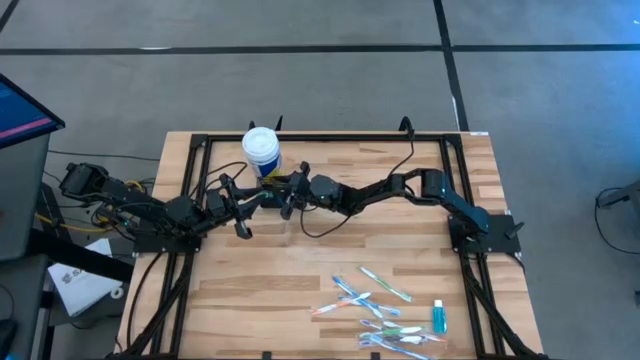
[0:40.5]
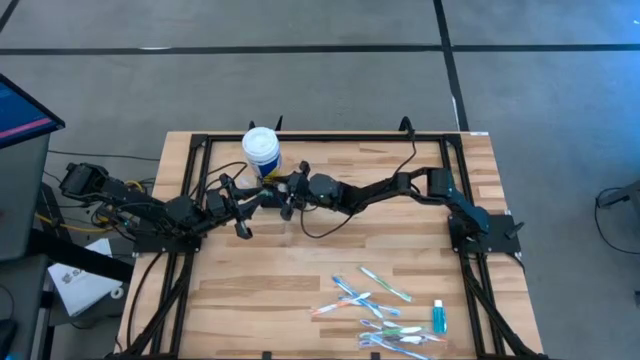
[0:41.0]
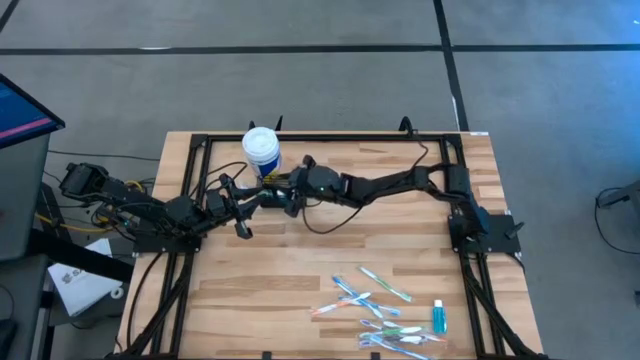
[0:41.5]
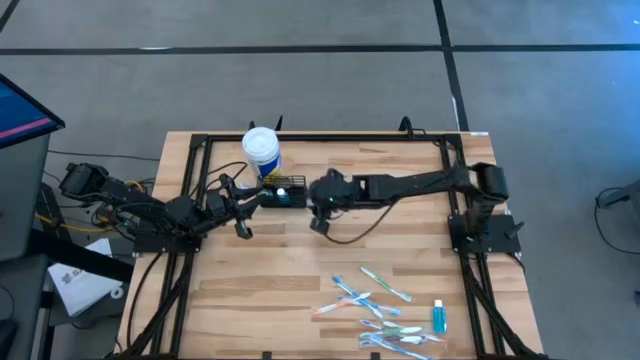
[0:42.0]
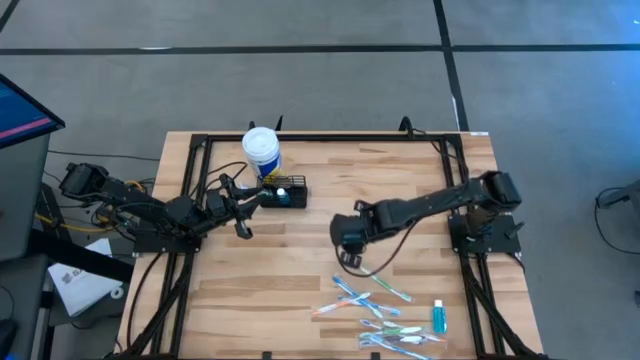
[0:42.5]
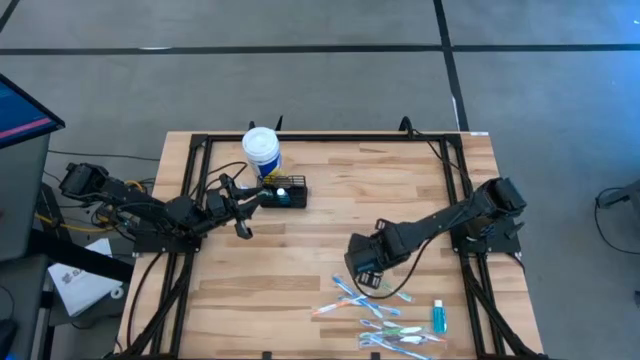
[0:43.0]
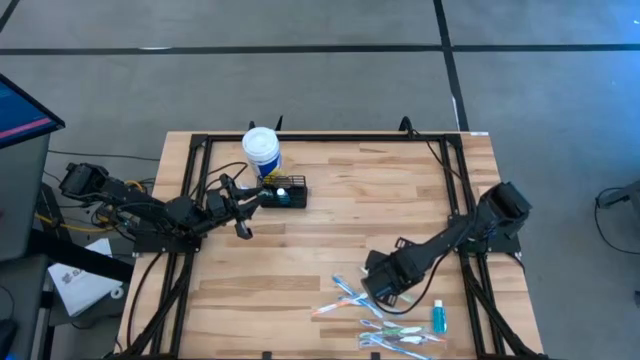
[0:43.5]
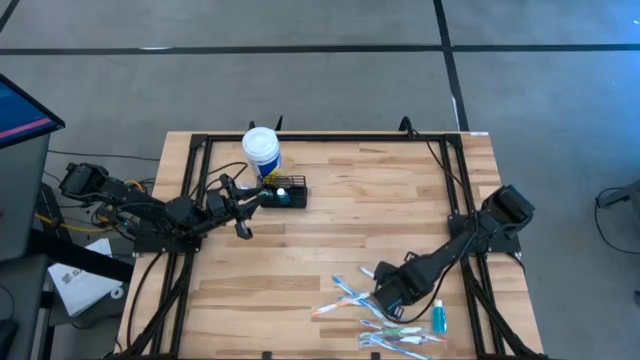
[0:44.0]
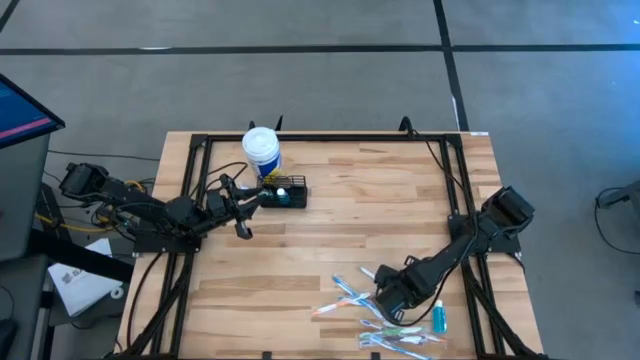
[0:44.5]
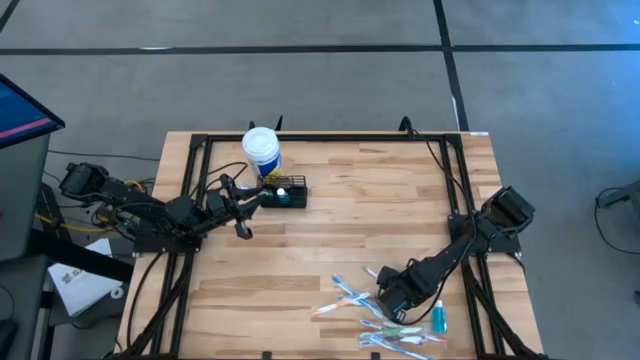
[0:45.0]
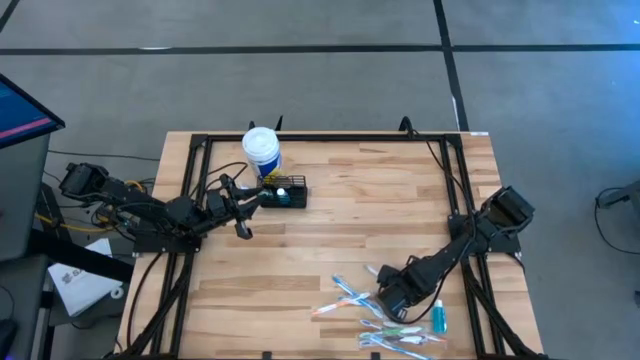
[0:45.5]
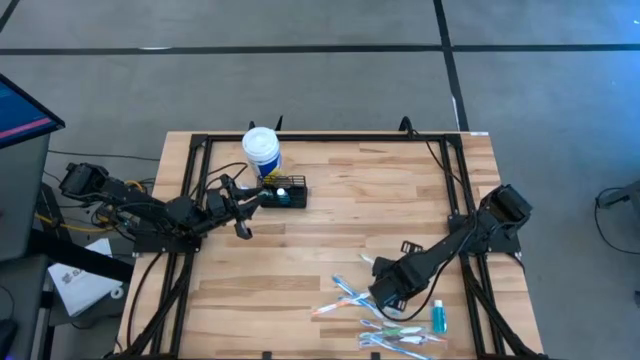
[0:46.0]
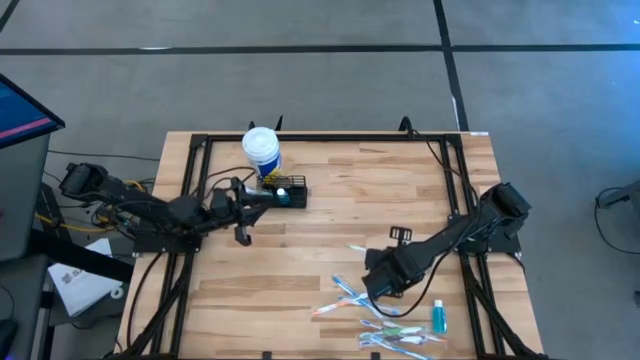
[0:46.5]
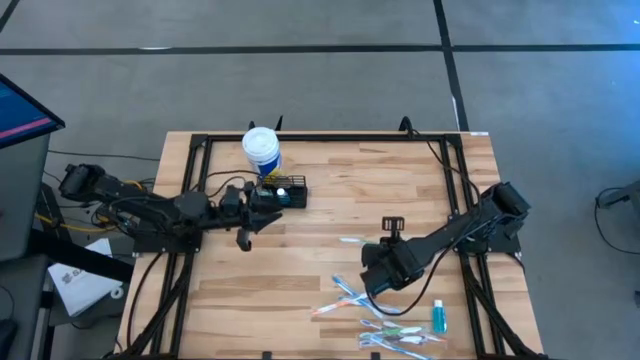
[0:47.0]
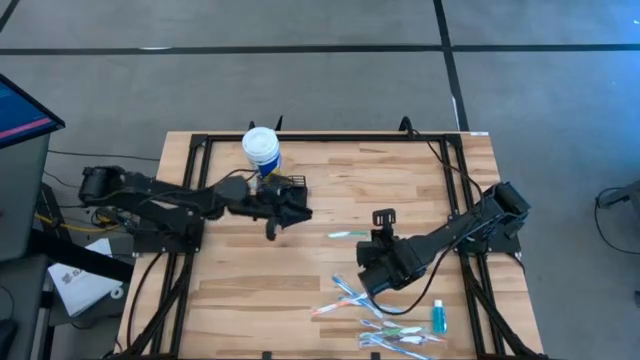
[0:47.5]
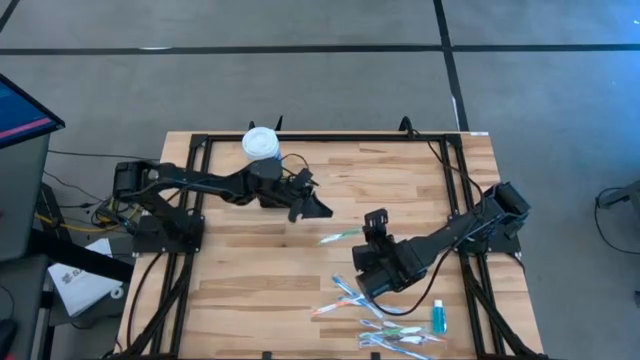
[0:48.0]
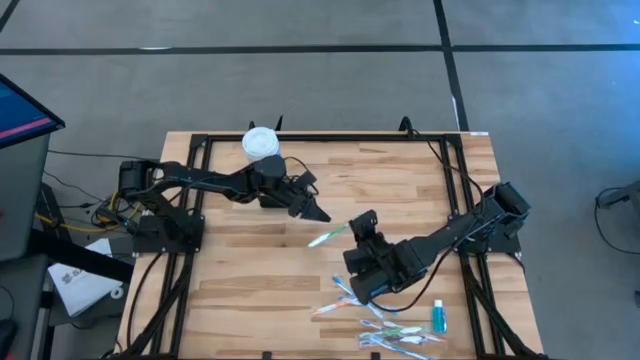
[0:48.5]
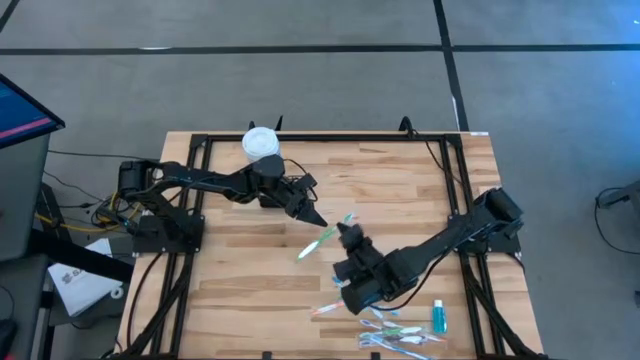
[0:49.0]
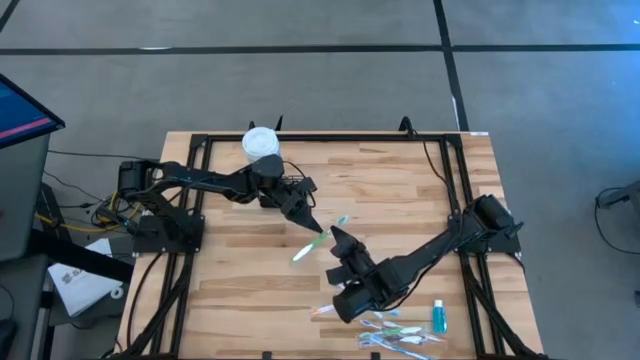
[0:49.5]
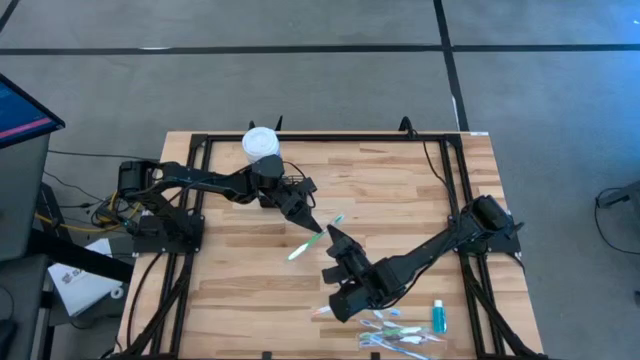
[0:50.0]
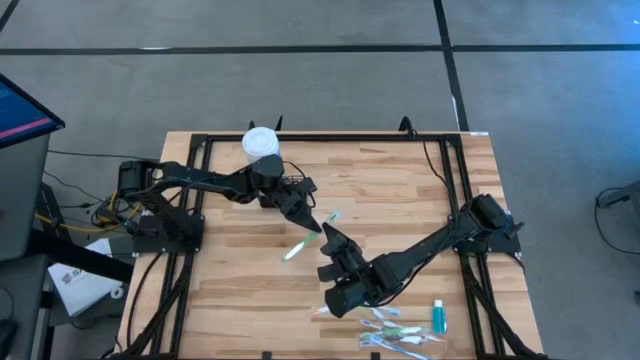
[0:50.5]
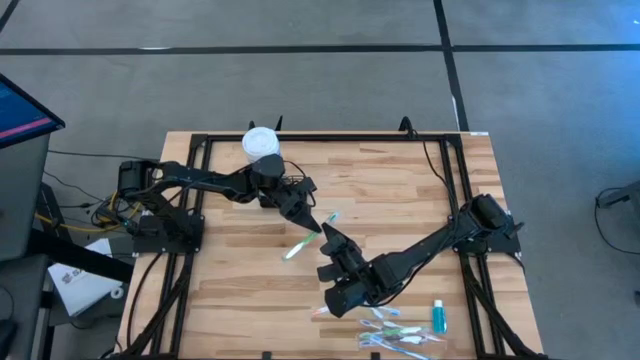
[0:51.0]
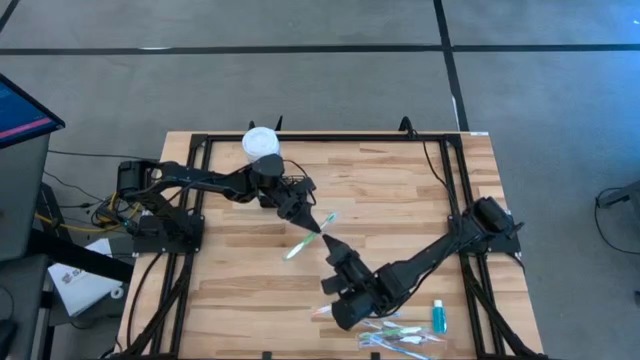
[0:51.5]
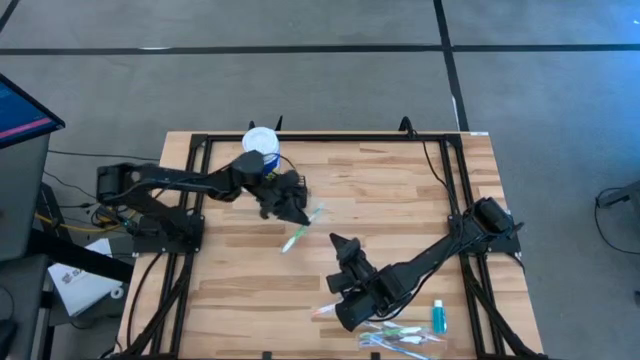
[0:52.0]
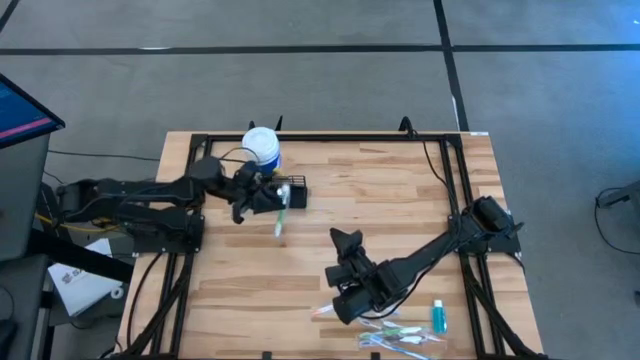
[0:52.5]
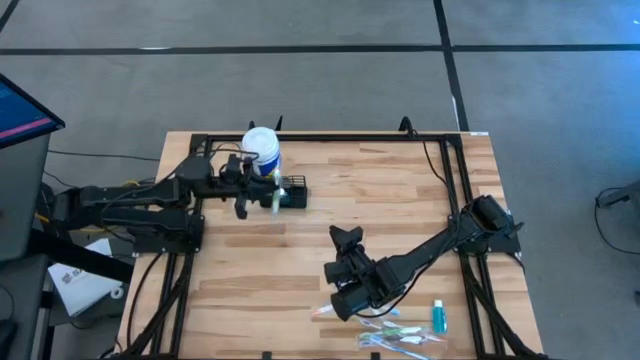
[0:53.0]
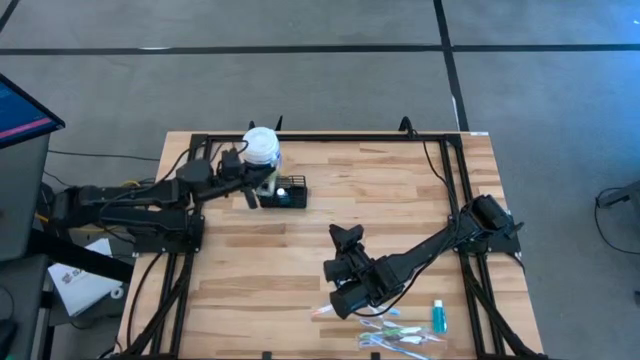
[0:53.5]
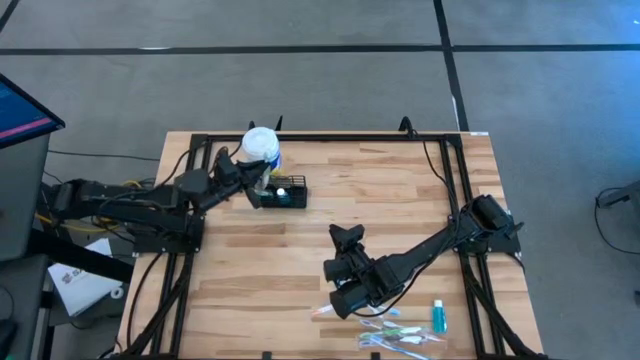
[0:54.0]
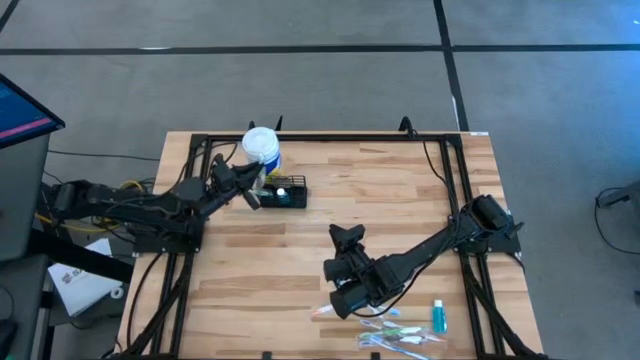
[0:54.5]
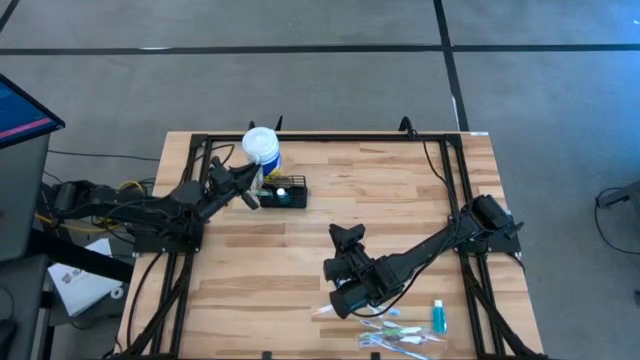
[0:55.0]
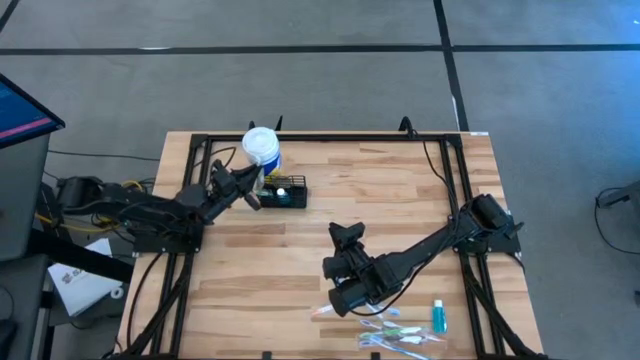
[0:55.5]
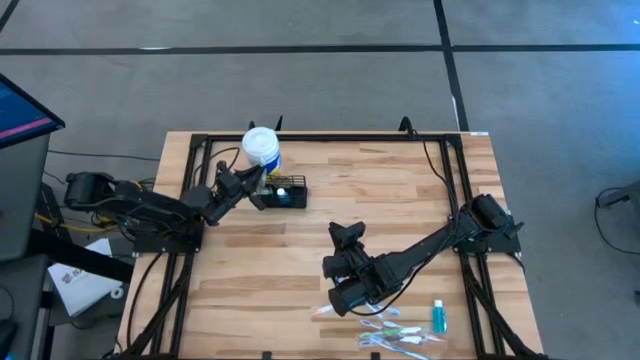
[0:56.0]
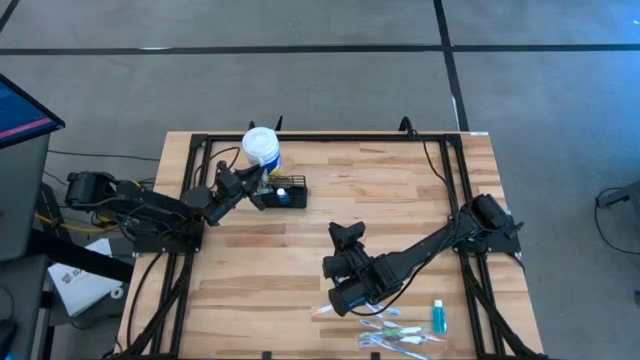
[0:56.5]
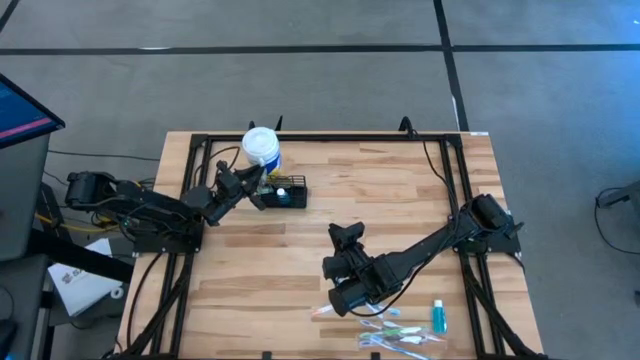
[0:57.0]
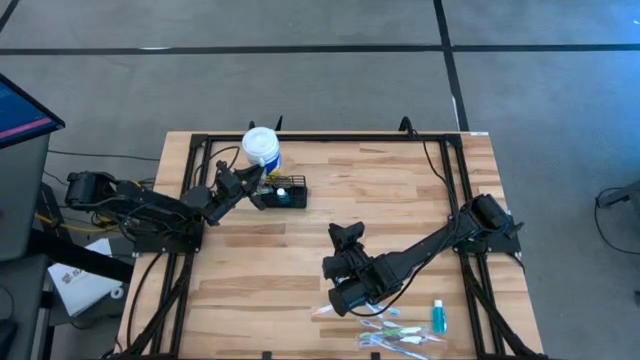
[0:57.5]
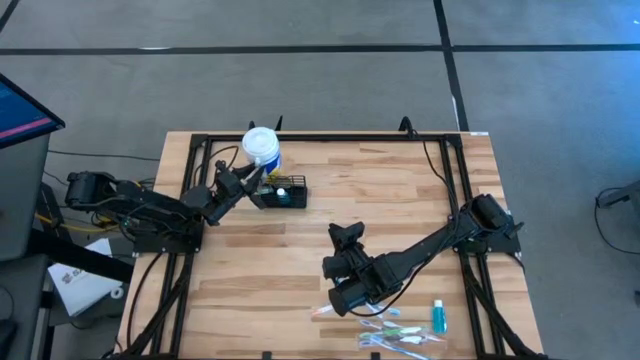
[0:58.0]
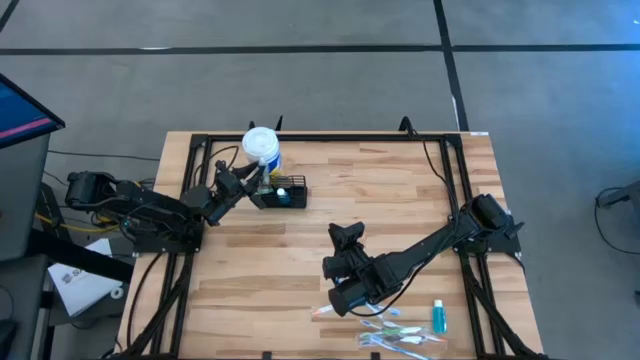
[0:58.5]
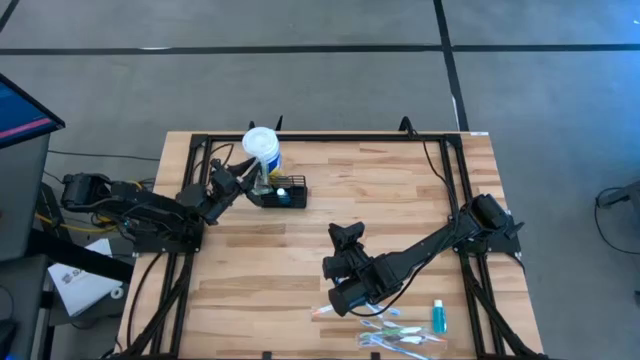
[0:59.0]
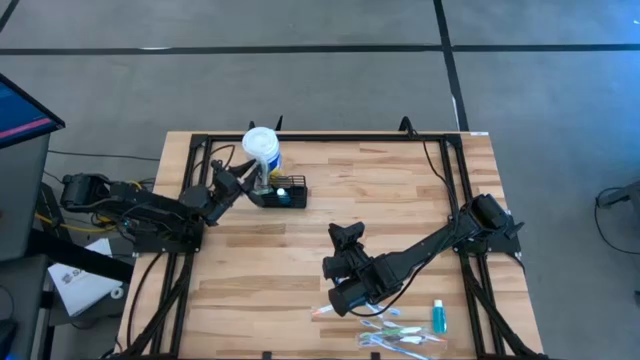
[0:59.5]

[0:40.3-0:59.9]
Task: Pick & Place toothbrushing station
Put the green toothbrush into the wire organizer

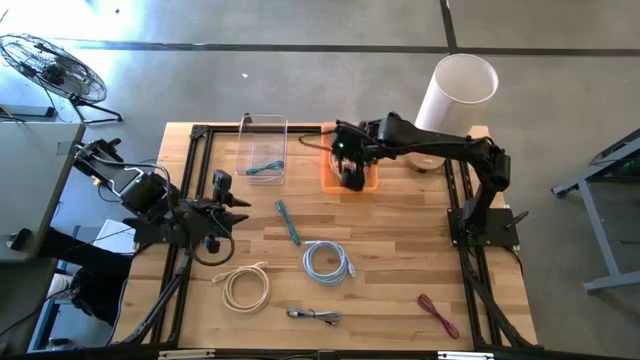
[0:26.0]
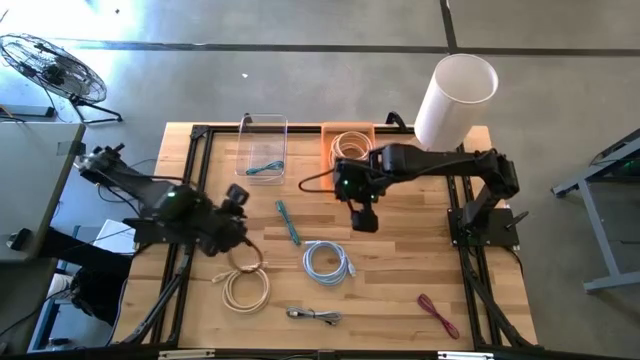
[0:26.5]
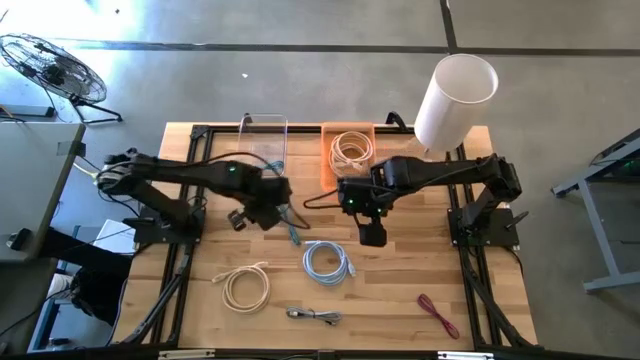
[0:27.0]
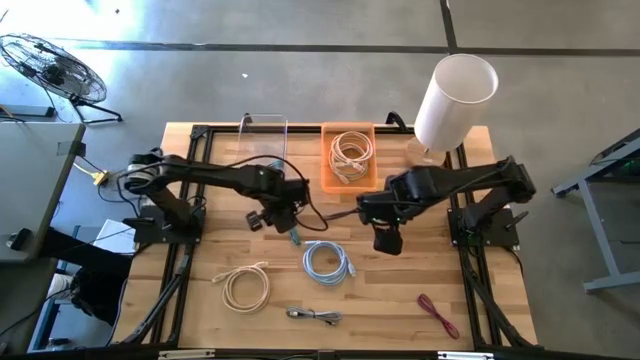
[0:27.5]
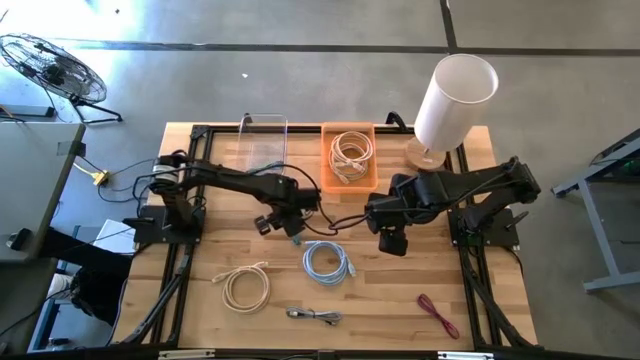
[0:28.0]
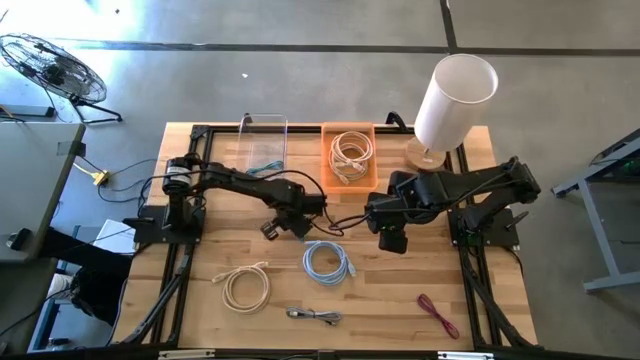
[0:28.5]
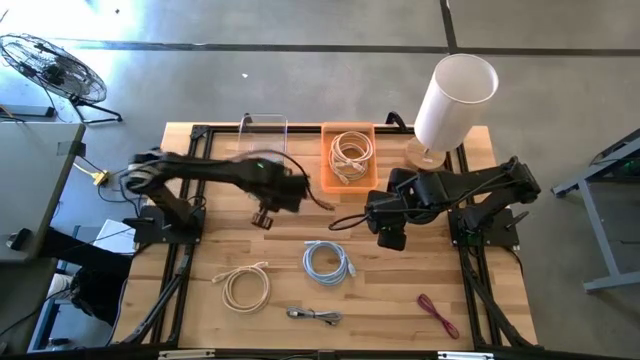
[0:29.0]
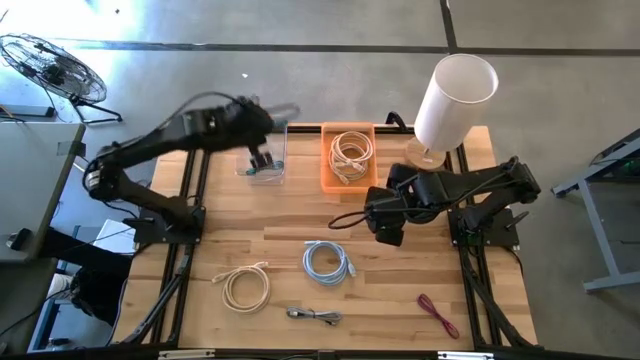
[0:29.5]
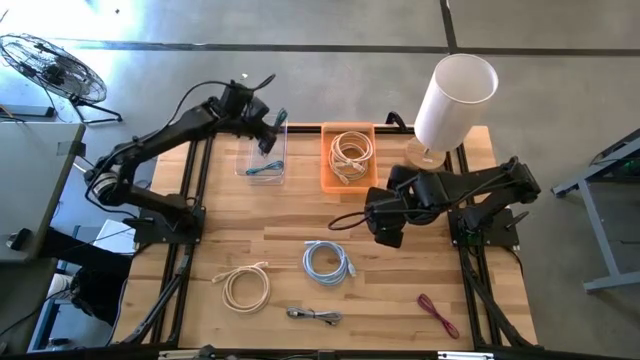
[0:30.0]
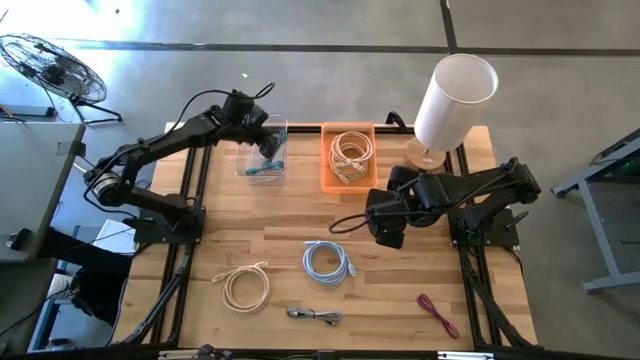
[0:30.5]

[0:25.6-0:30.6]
Task: Pick & Place USB Port
Put the black and blue charger cable into the transparent bin
